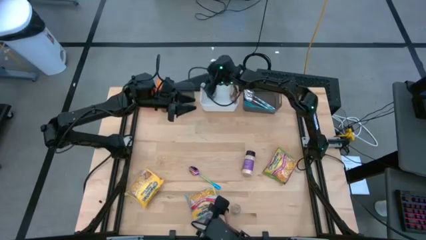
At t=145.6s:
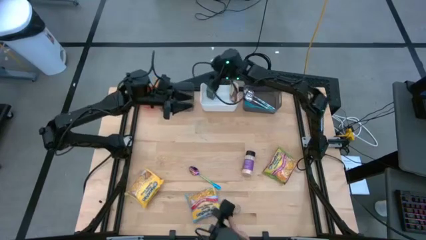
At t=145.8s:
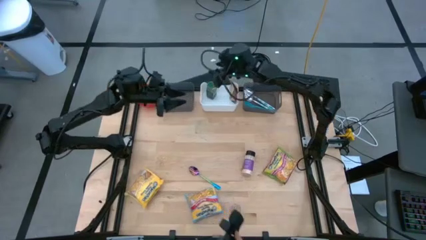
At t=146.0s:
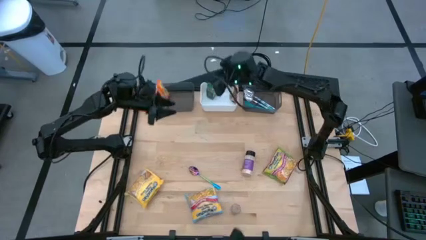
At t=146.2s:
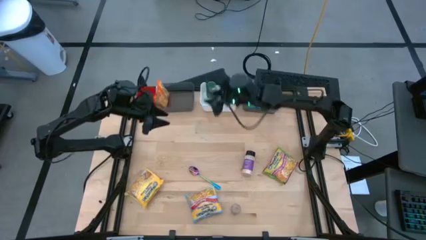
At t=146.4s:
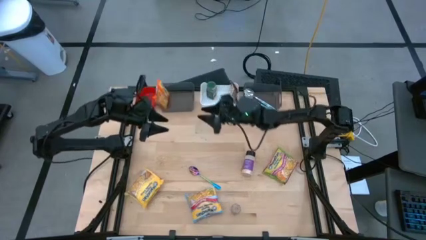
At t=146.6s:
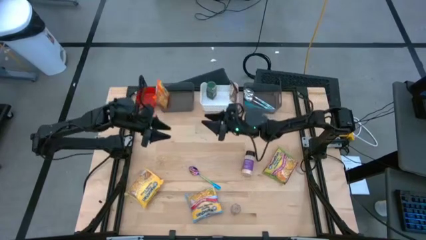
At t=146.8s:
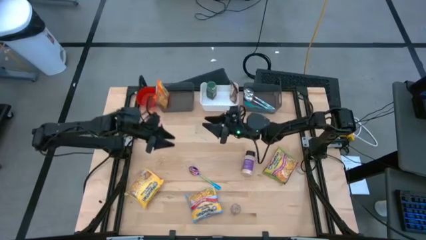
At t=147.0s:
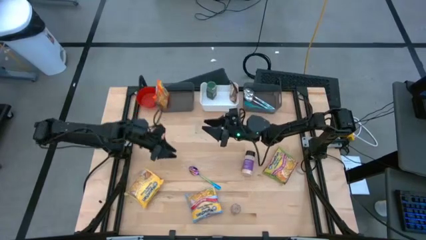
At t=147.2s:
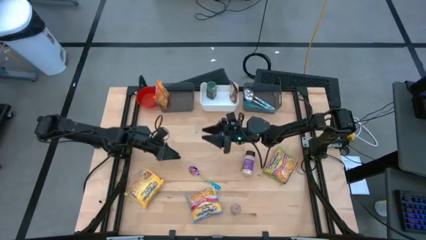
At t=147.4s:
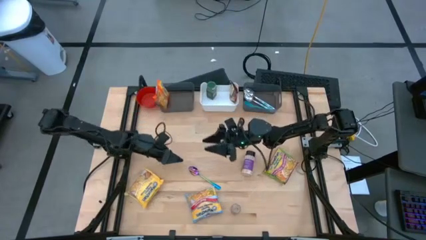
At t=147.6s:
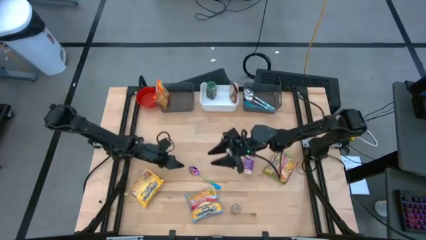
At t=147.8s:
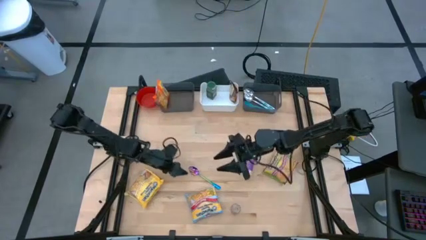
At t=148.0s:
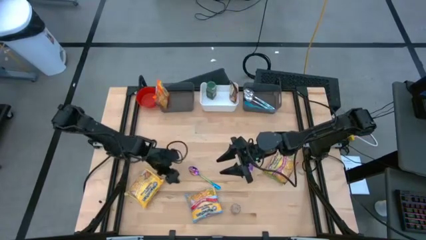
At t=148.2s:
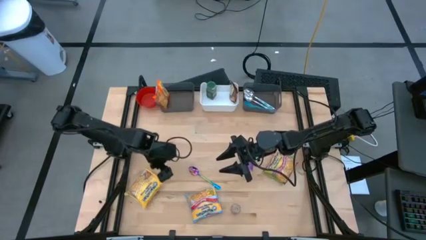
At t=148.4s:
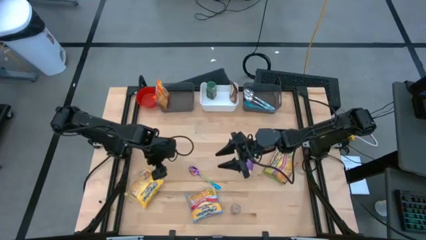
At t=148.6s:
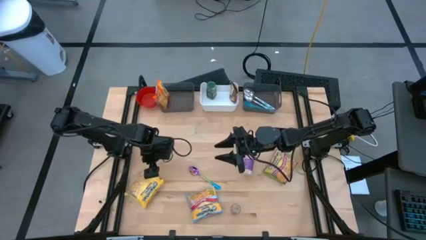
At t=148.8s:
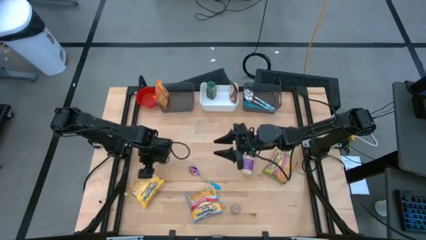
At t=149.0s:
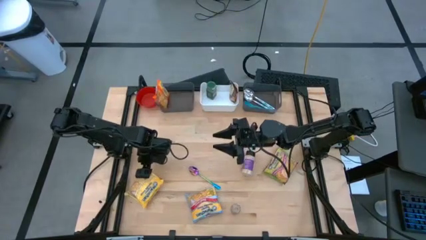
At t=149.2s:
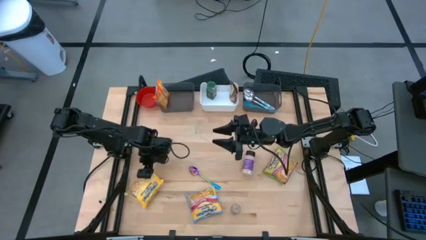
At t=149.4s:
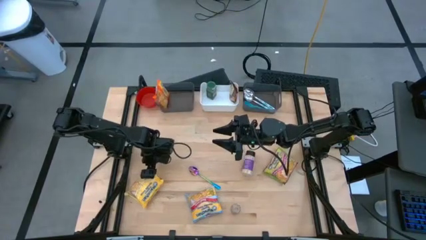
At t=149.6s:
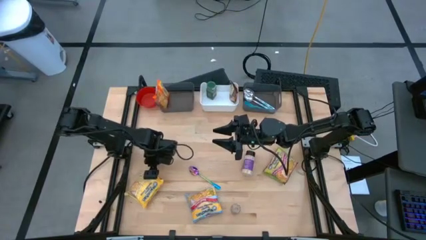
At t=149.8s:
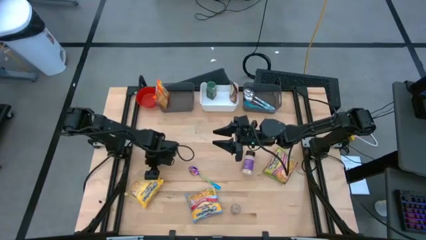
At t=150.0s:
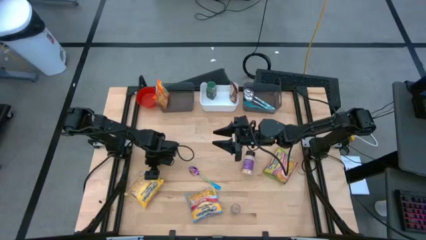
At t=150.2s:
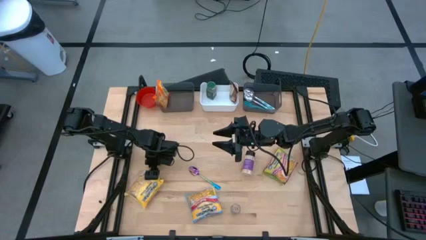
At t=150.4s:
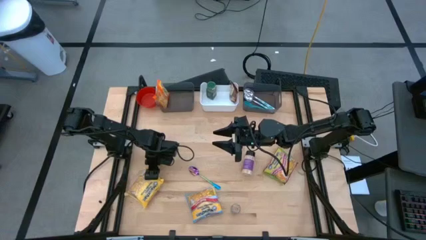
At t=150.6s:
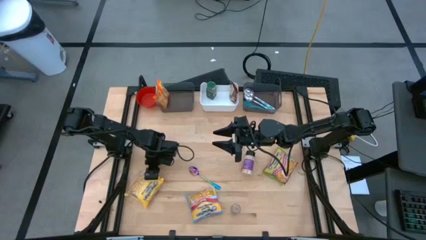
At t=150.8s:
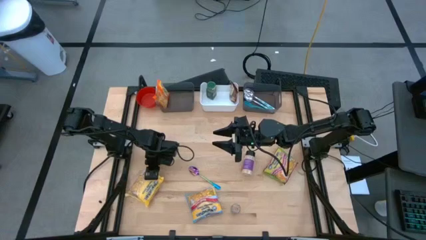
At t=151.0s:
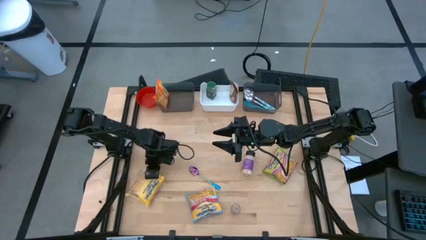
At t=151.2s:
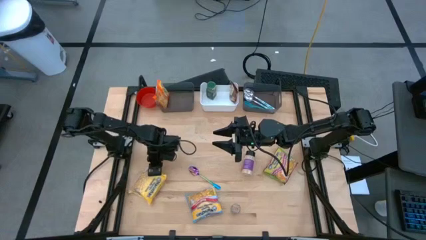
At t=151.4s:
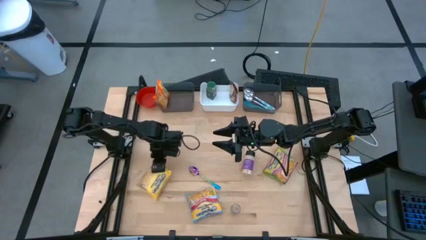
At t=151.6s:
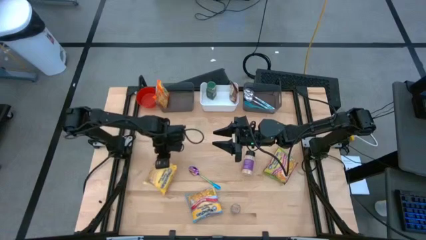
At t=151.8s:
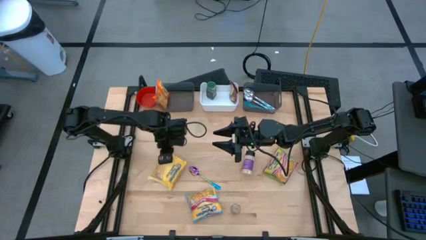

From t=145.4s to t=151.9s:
Task: Pick & Place Food Item
Put the yellow noodle pack into the left black bin
